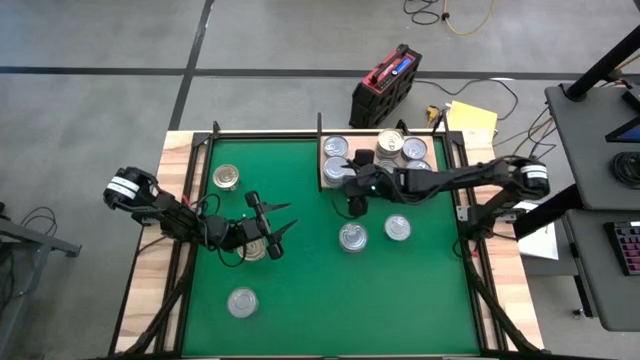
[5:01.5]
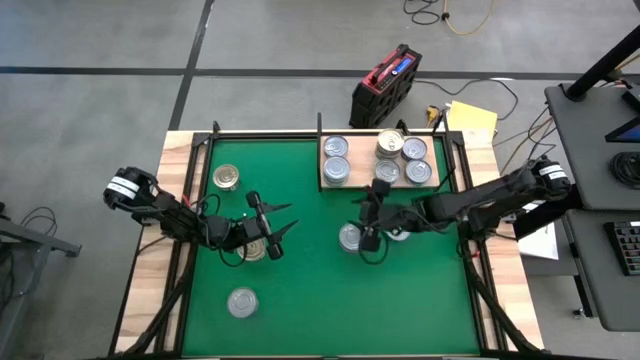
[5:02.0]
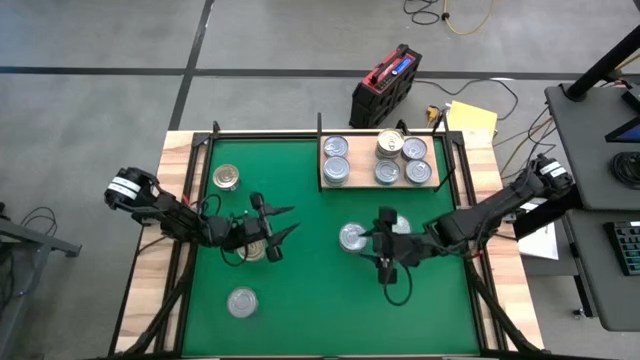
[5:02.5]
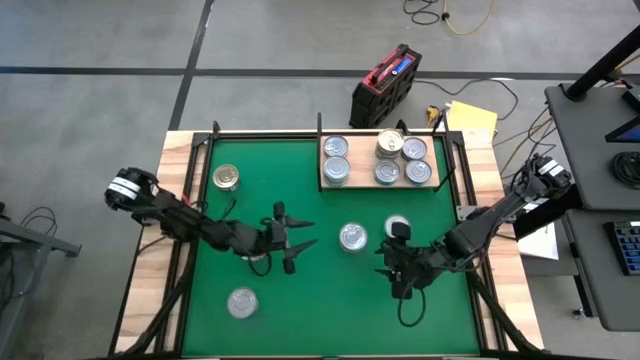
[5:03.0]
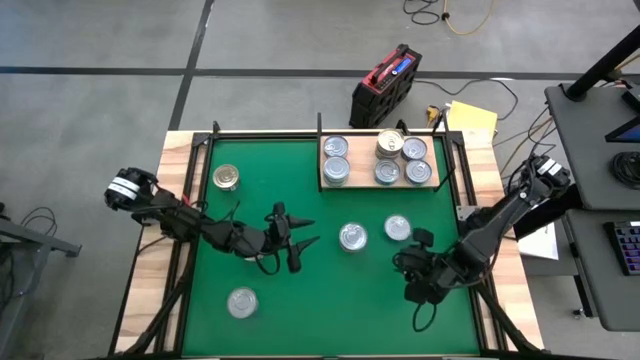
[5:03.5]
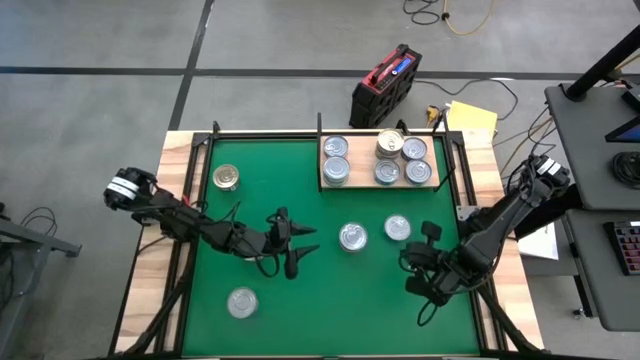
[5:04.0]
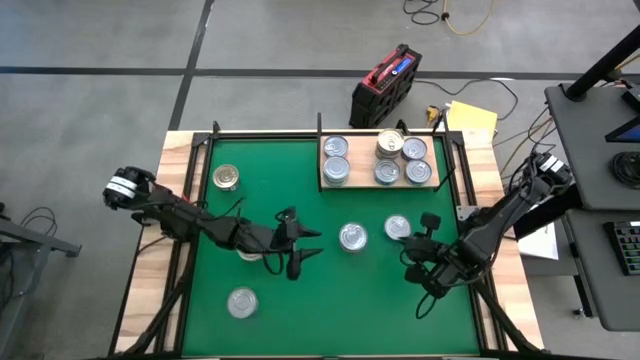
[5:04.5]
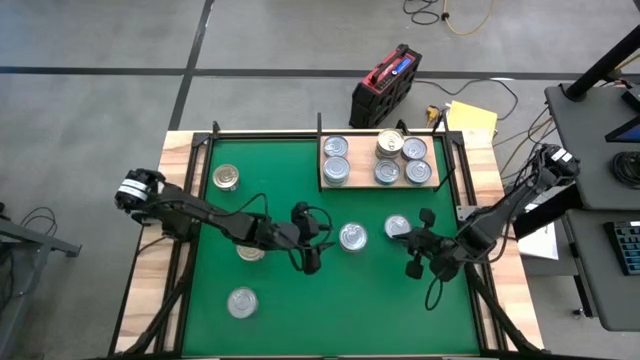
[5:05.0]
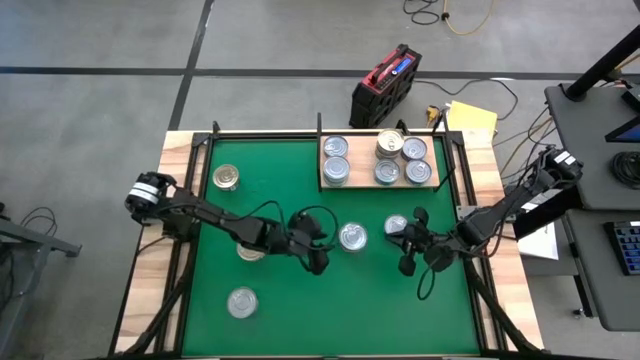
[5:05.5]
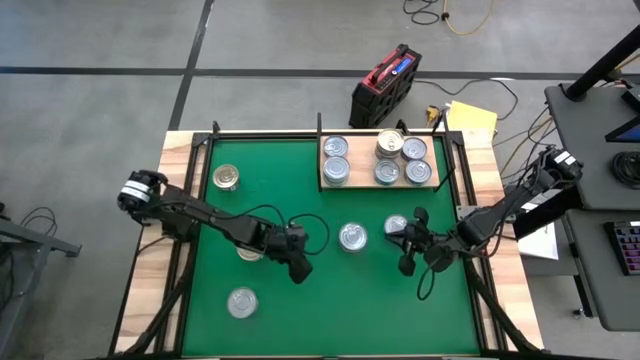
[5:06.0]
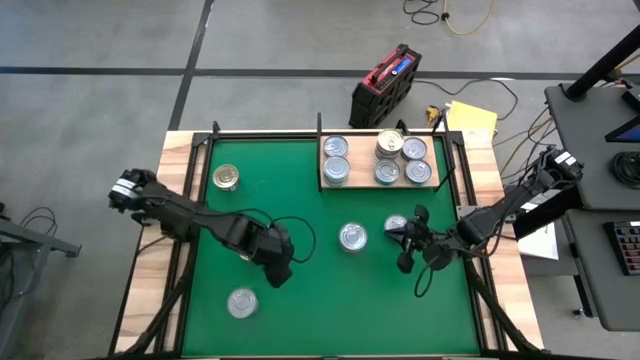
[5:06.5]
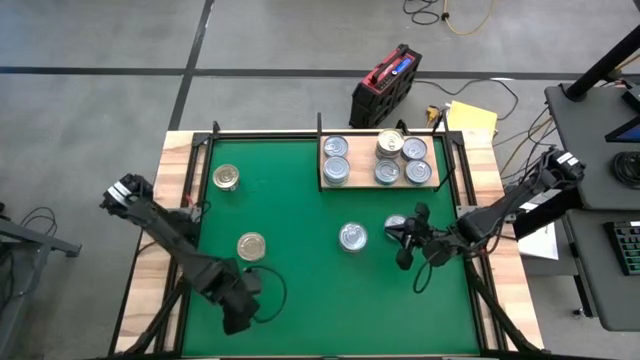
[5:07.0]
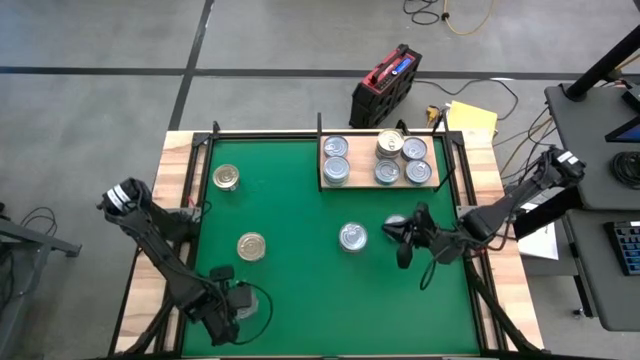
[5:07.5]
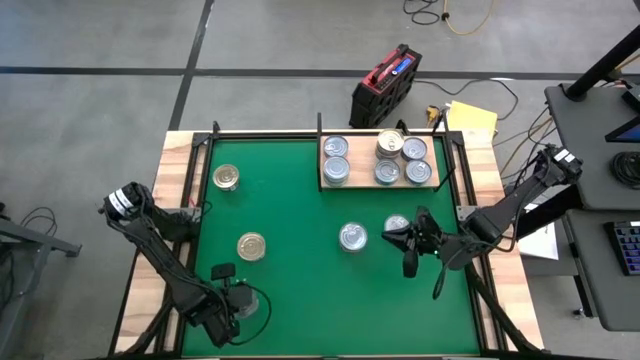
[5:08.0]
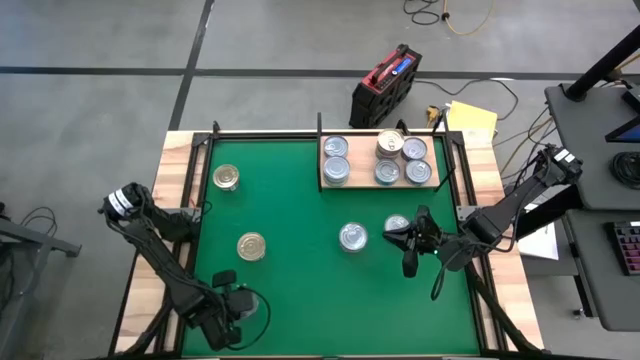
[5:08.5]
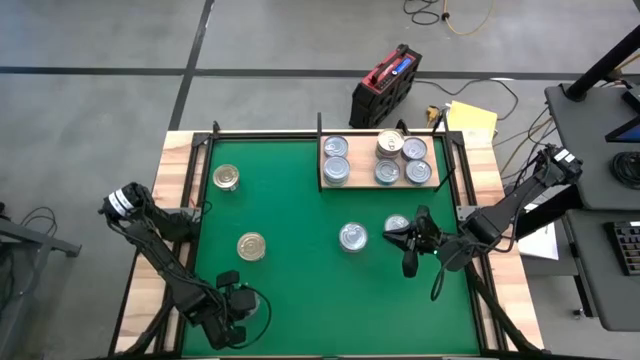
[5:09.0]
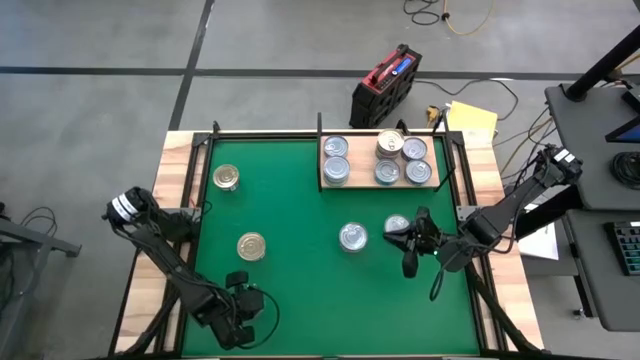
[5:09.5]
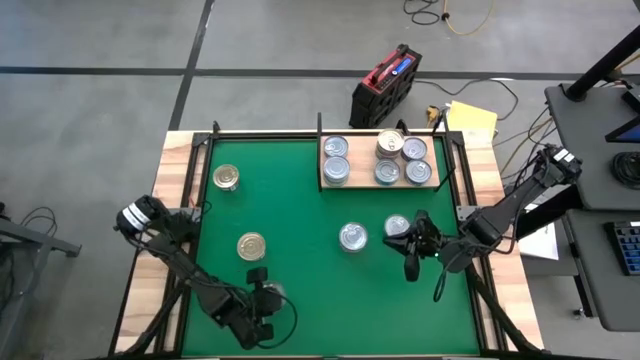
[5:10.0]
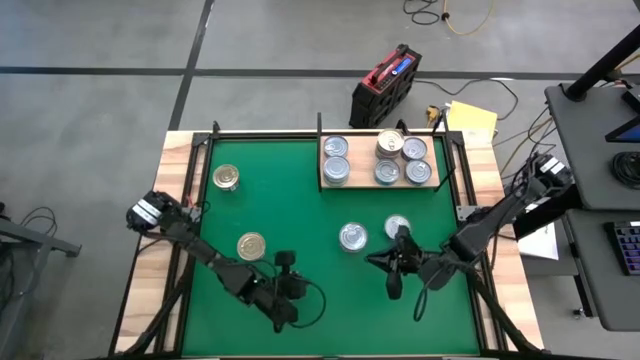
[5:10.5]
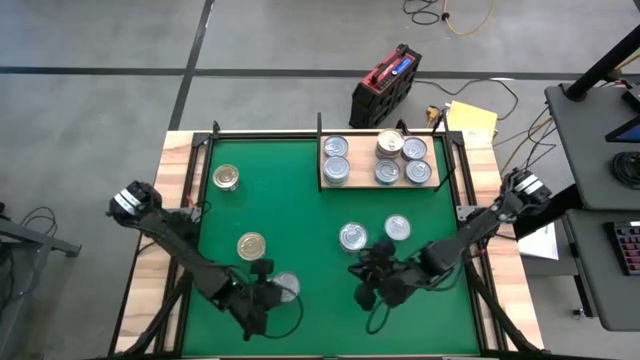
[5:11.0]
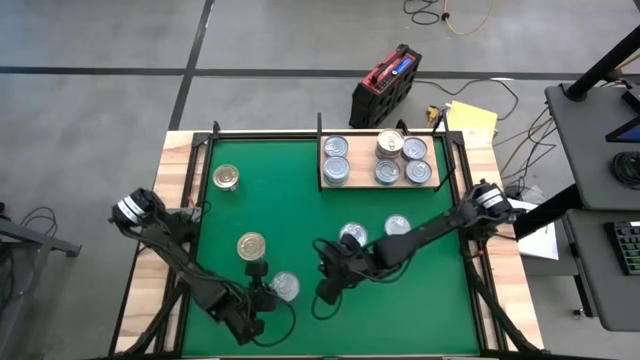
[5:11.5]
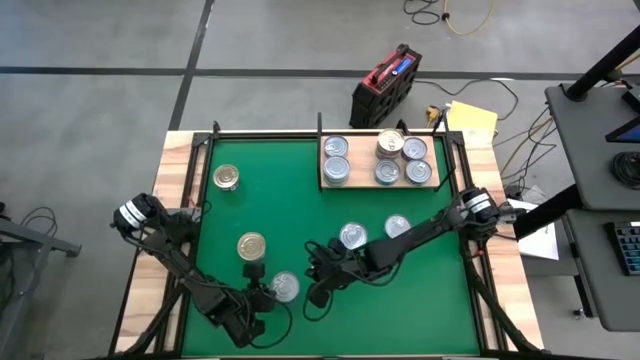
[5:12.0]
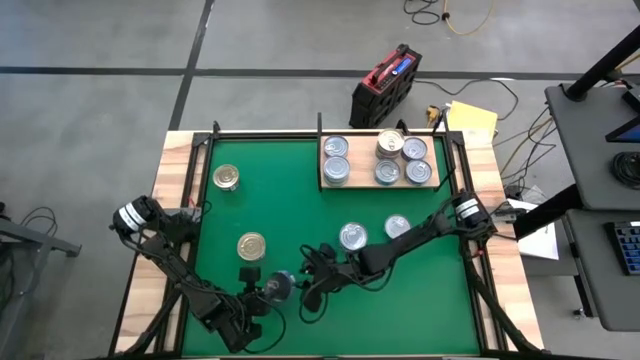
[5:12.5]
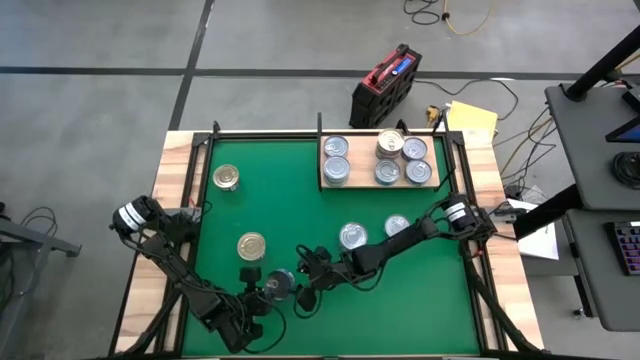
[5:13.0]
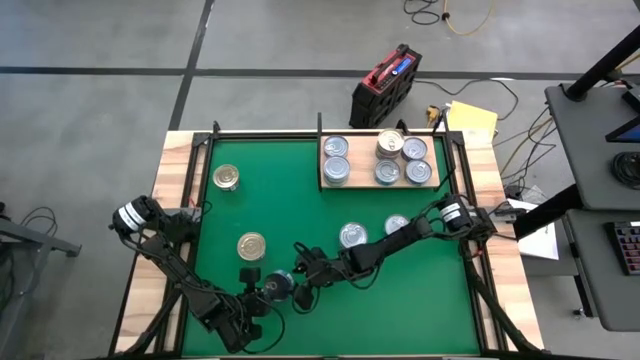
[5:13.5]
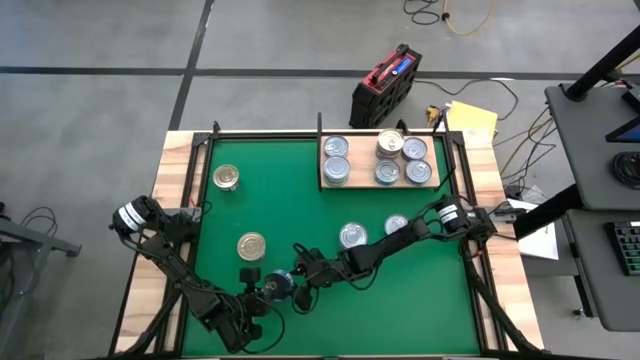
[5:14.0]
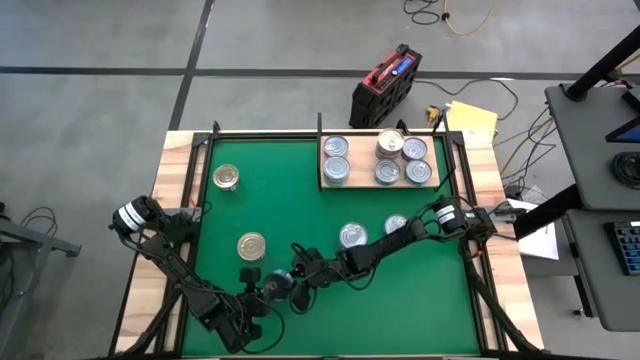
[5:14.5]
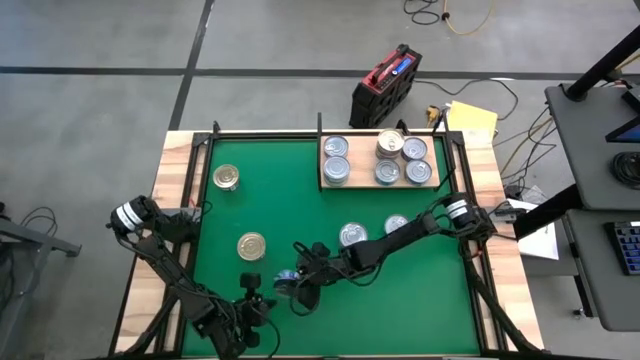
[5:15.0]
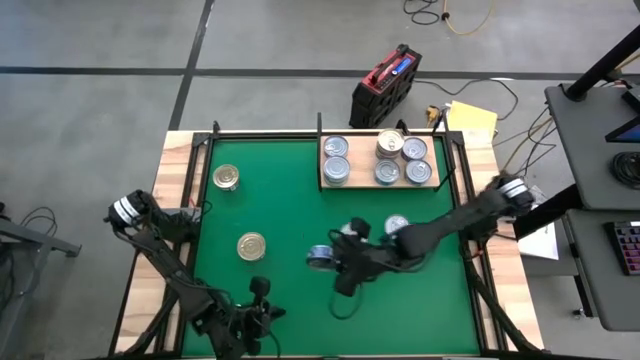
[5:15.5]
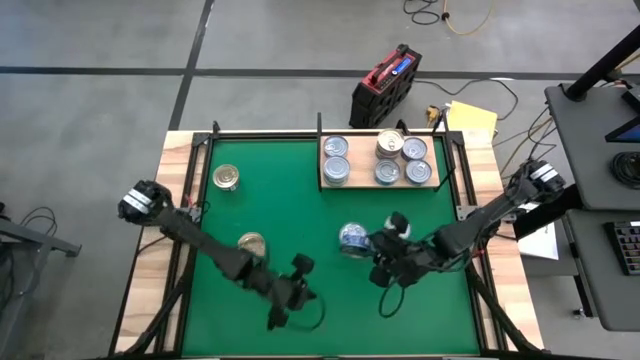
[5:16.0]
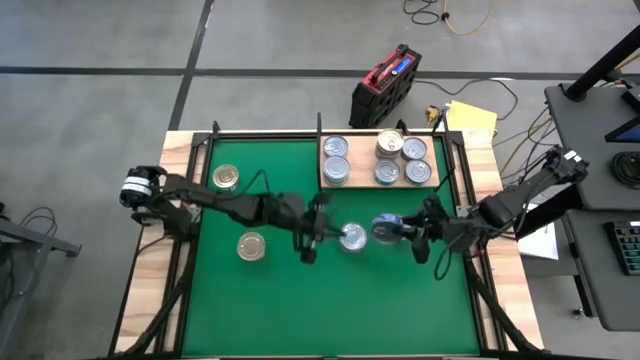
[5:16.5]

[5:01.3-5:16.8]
Task: Stack canned seafood by type on shelf
Stack the blue tuna can on top of the blue tuna can on the shelf

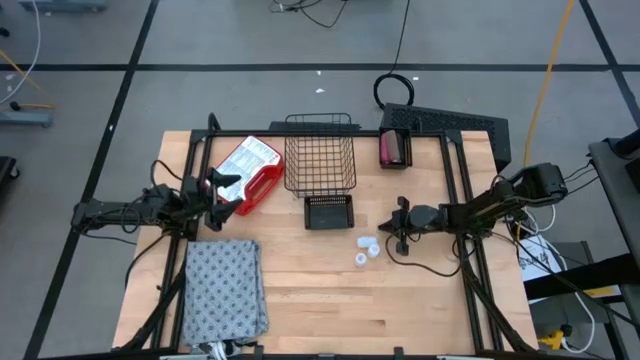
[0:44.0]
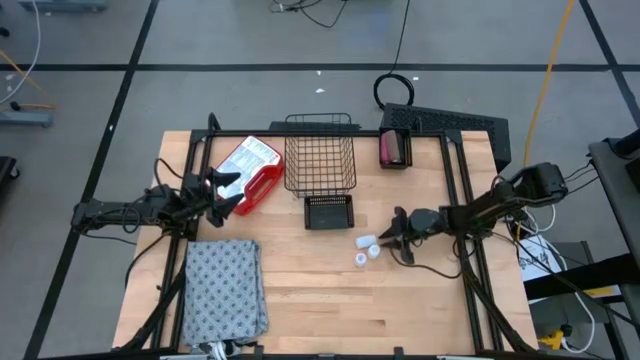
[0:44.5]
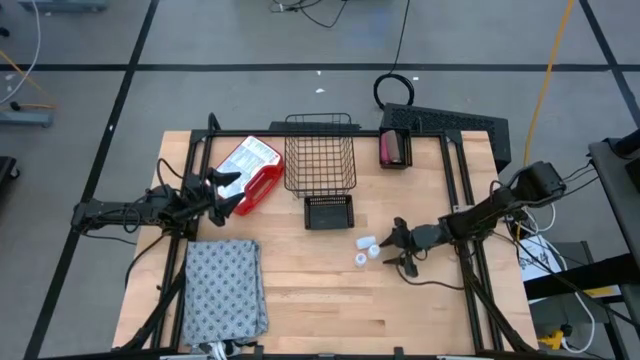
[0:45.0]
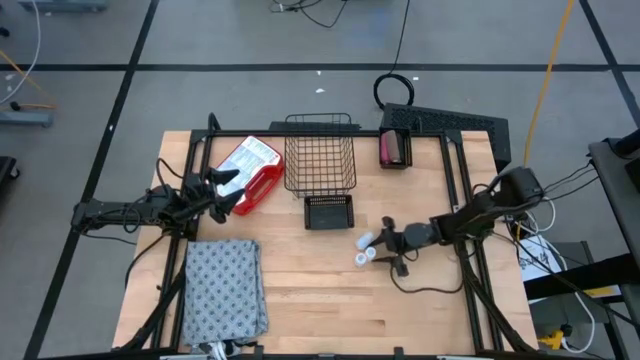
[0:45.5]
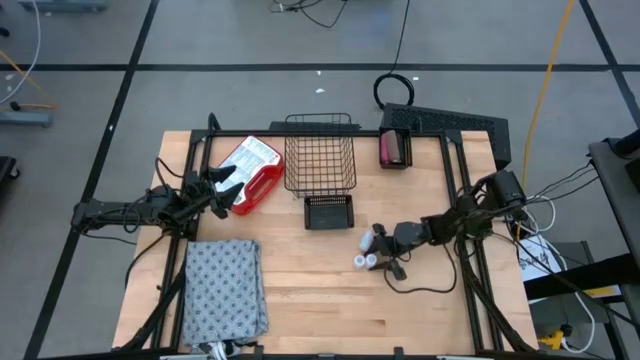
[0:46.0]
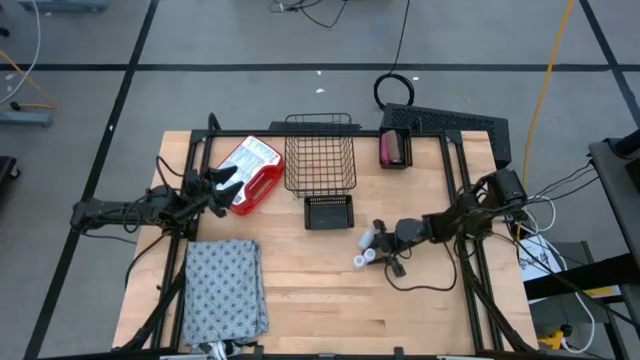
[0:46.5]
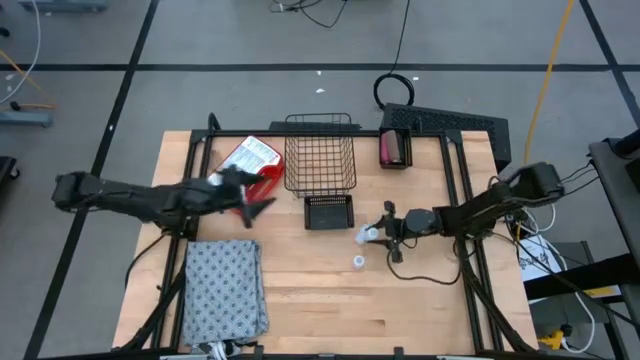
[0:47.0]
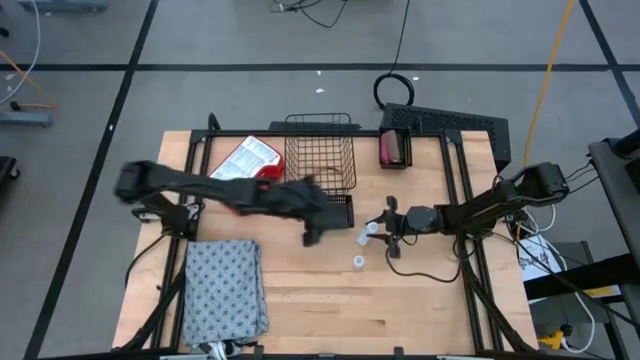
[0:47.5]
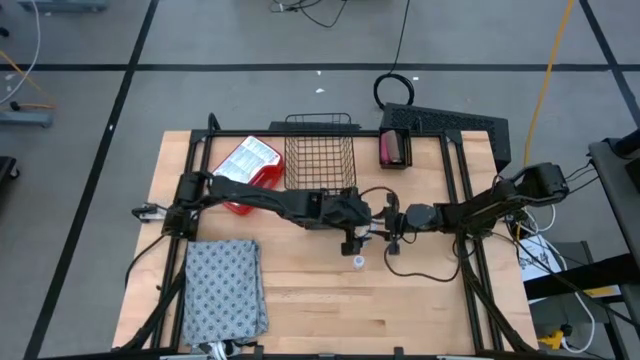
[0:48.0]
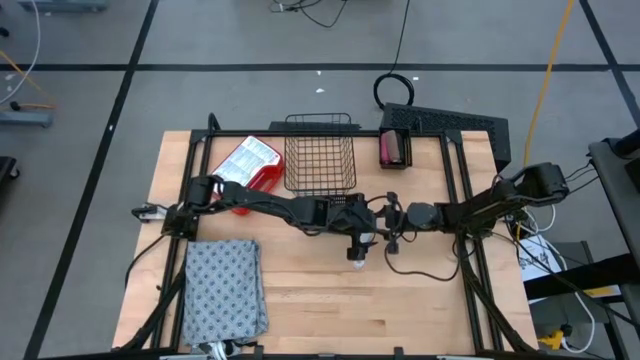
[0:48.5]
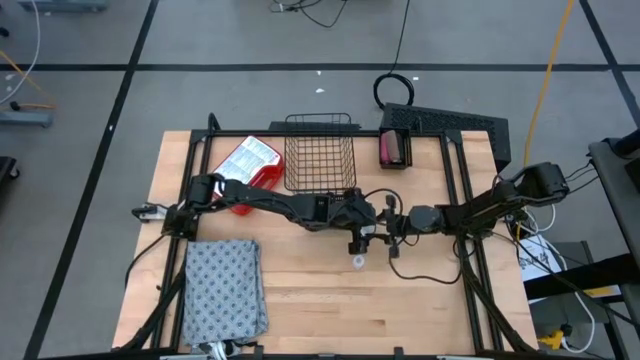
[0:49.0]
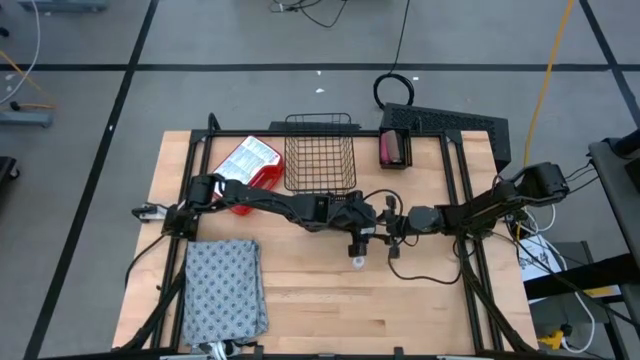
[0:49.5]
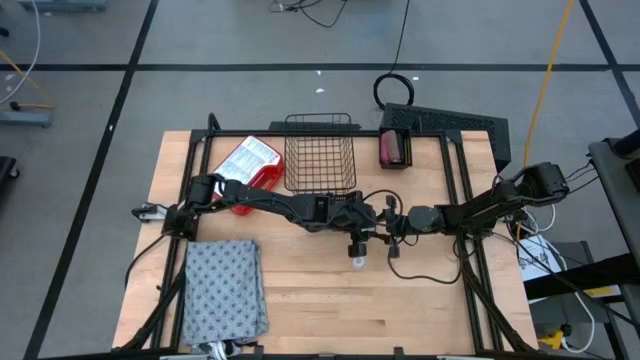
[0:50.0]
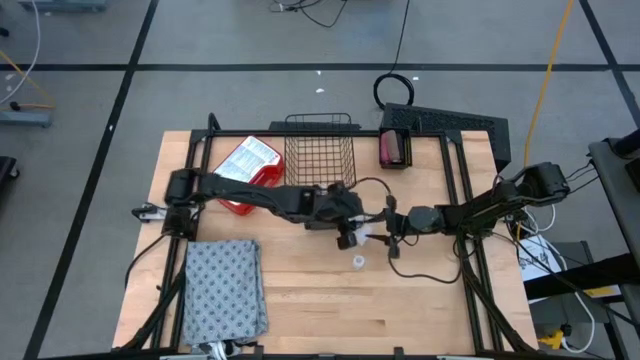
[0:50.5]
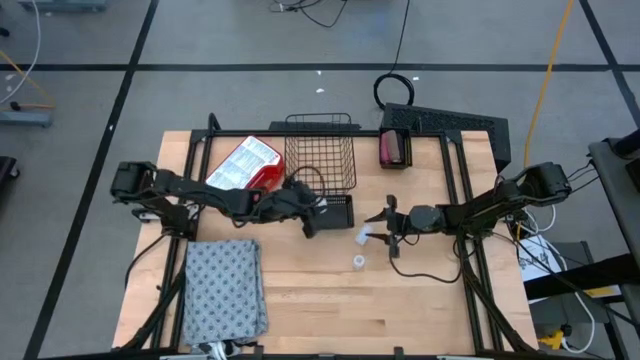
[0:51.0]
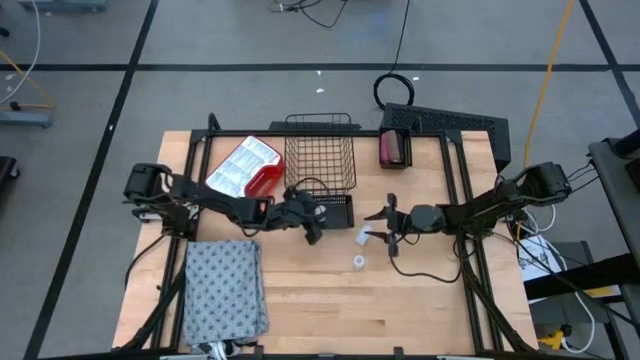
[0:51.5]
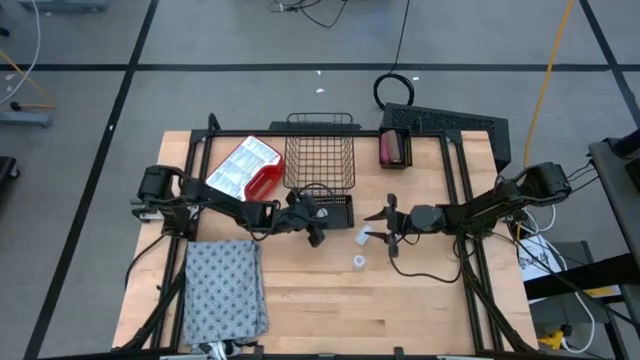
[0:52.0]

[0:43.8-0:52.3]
Task: Pick & place medical supplies in basket/bin
Put the bottom right white pill bottle into the bottom black bin
